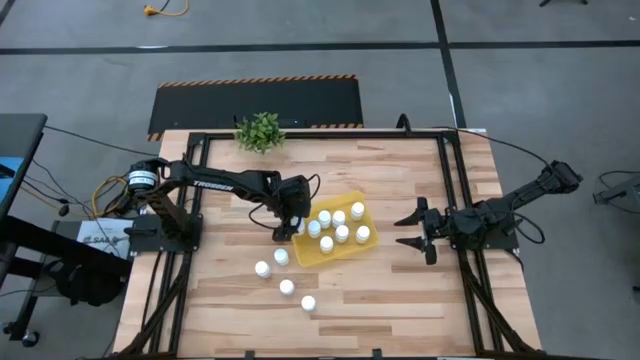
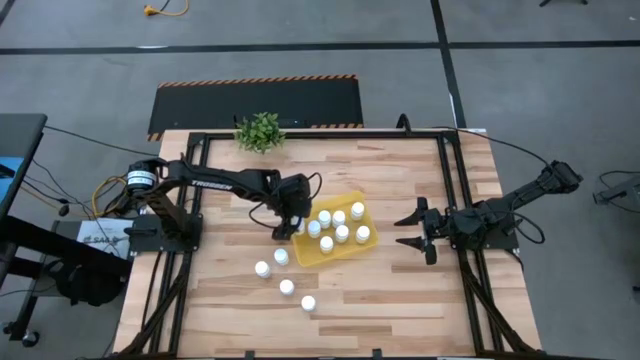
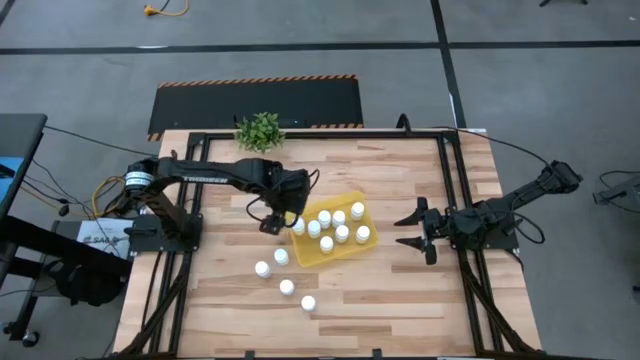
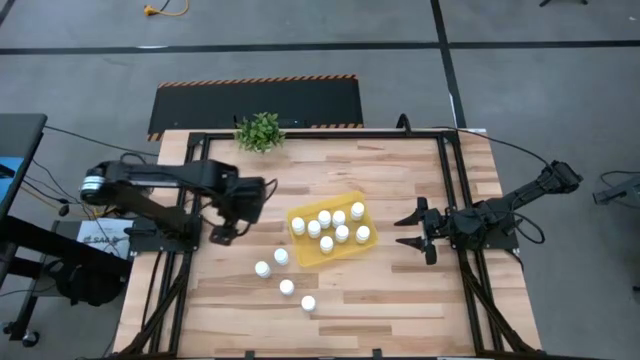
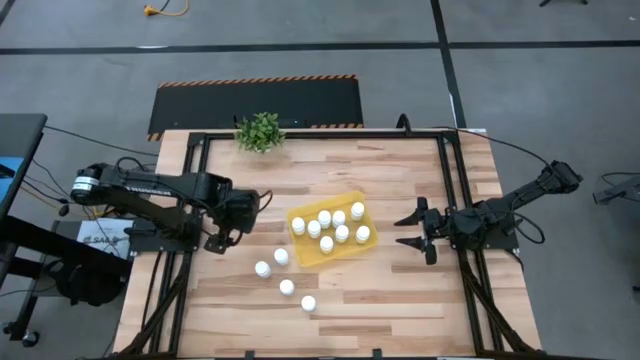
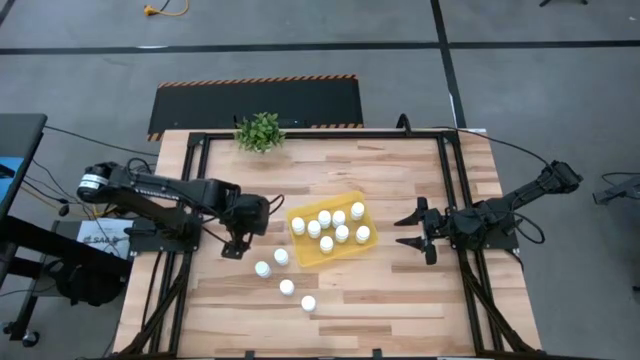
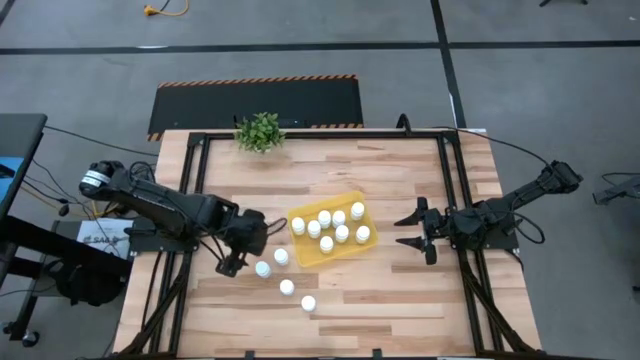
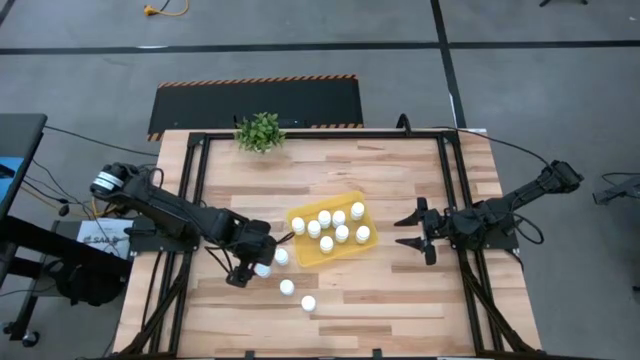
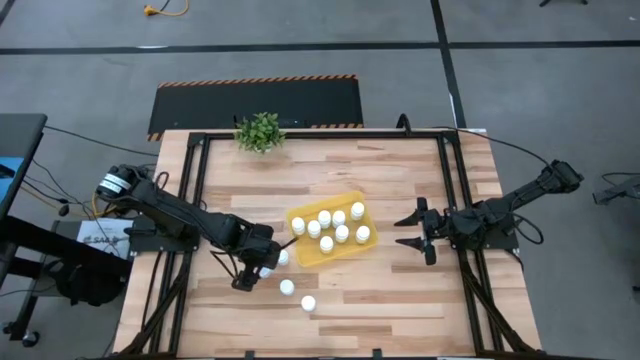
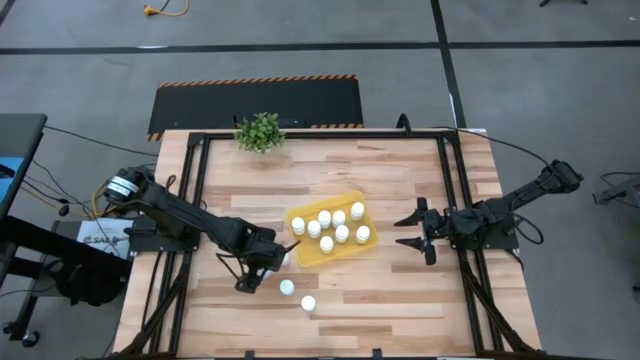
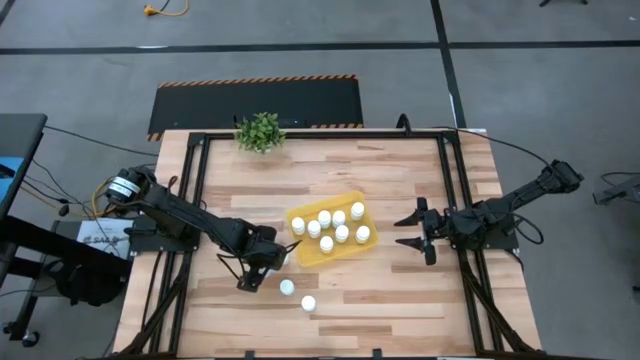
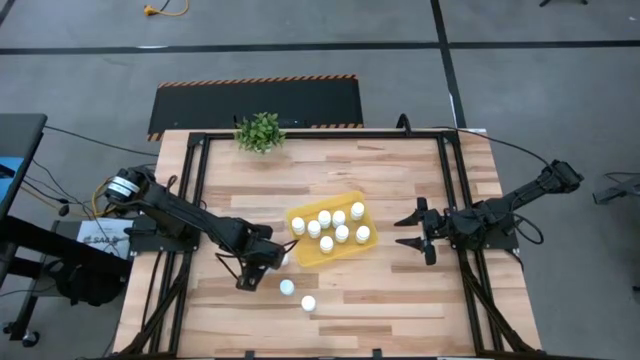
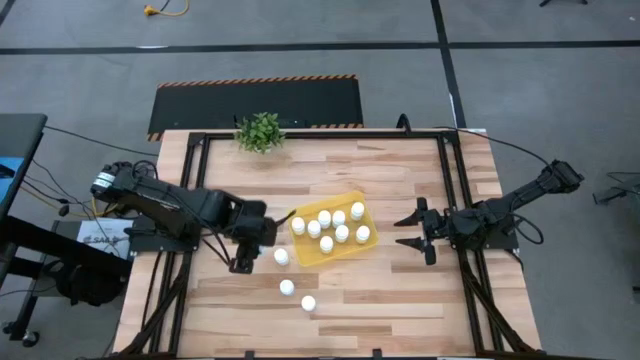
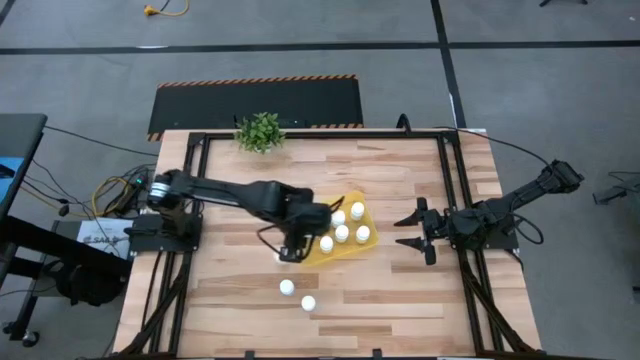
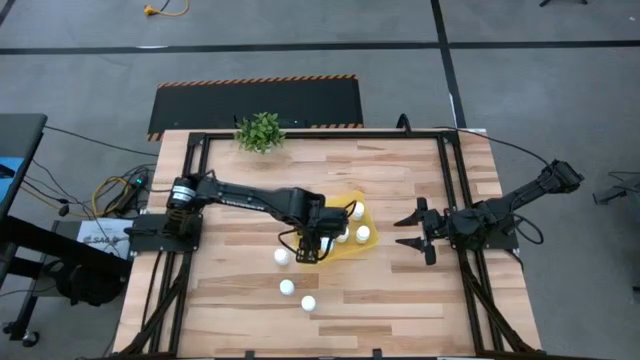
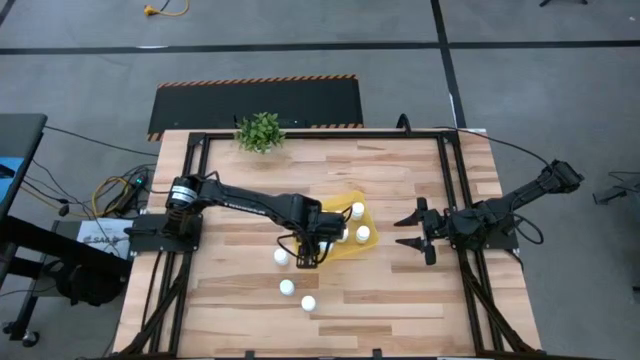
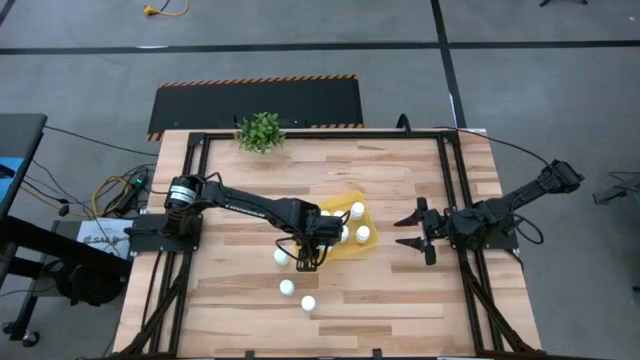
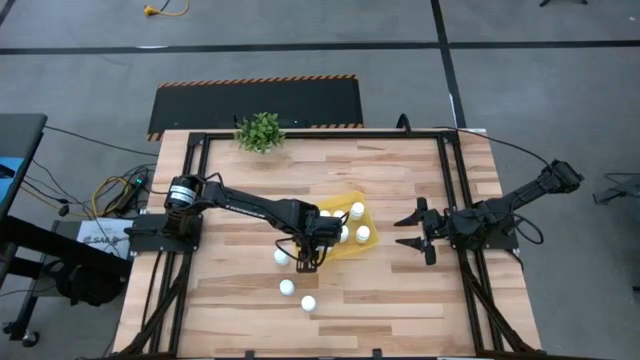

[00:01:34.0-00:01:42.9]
Task: Pick and place pill bottles into a basket
Put the white pill bottle into the yellow bin

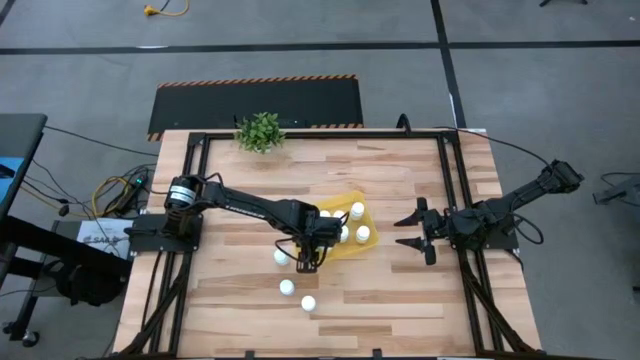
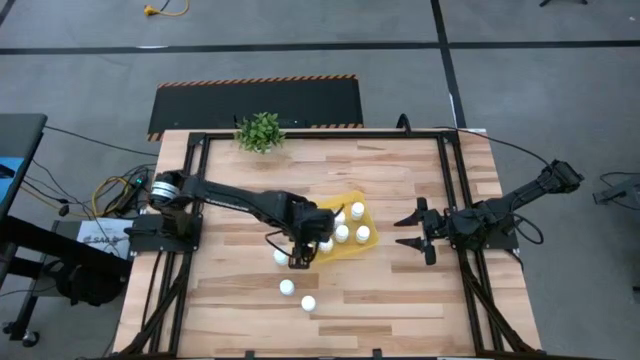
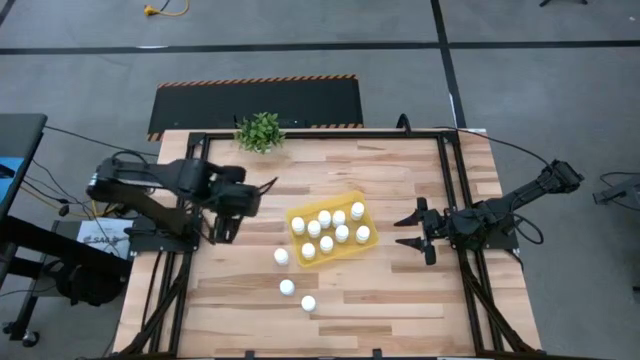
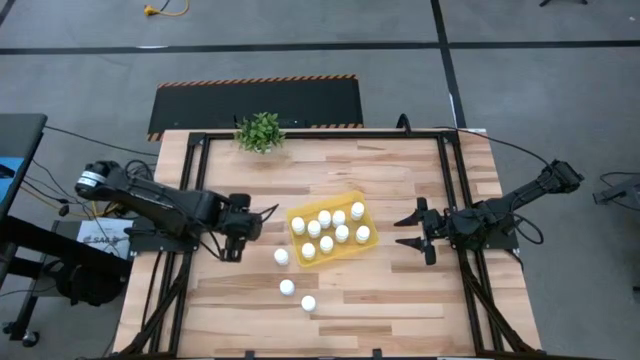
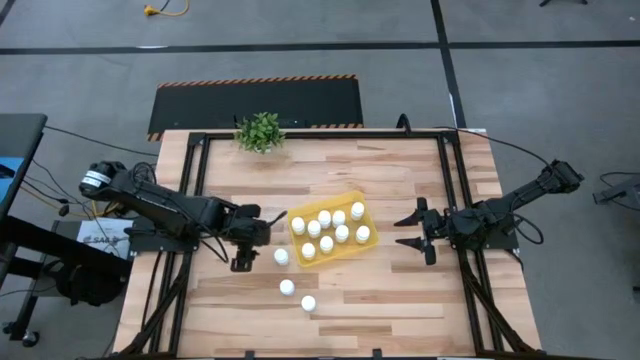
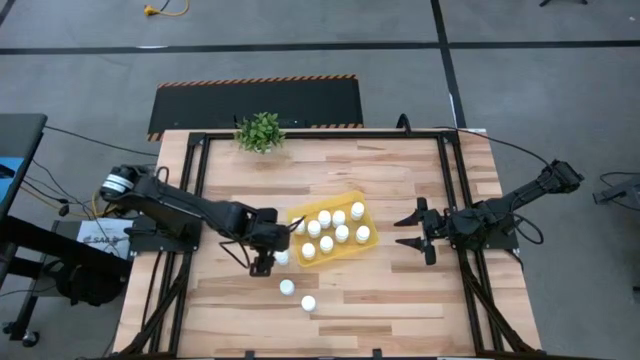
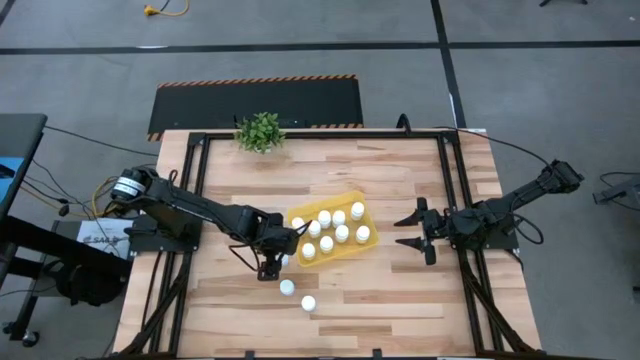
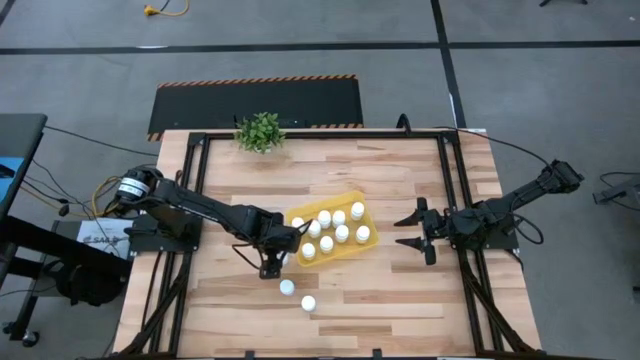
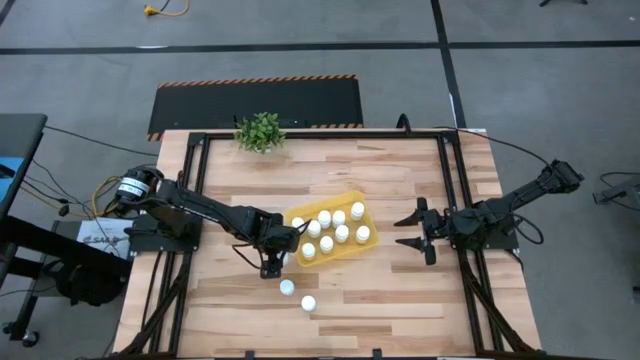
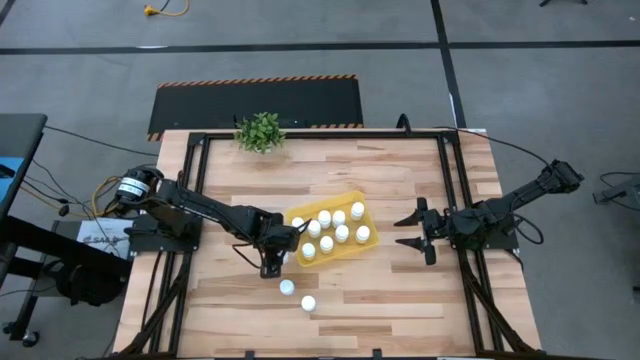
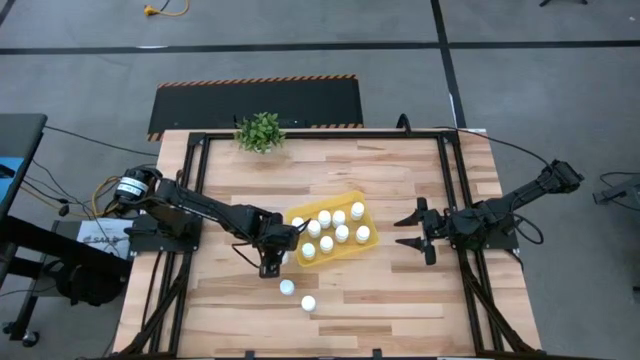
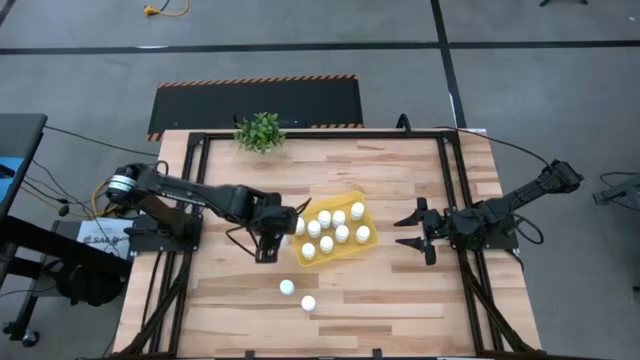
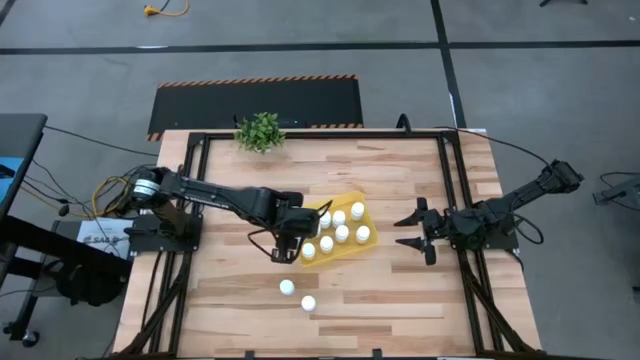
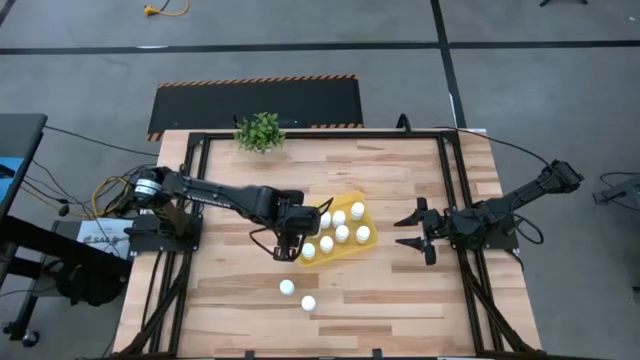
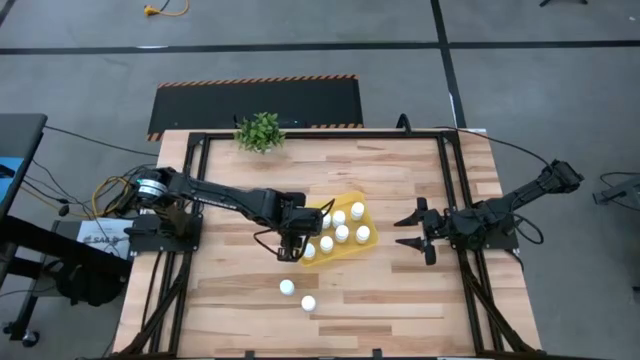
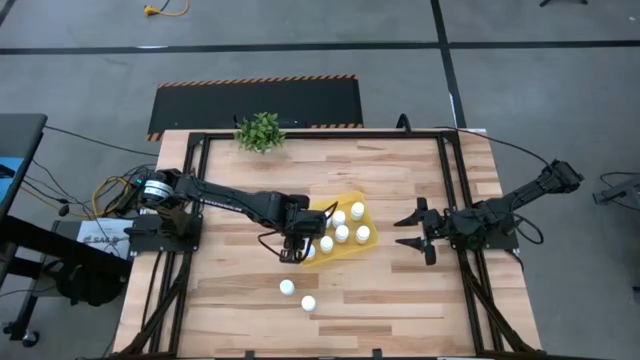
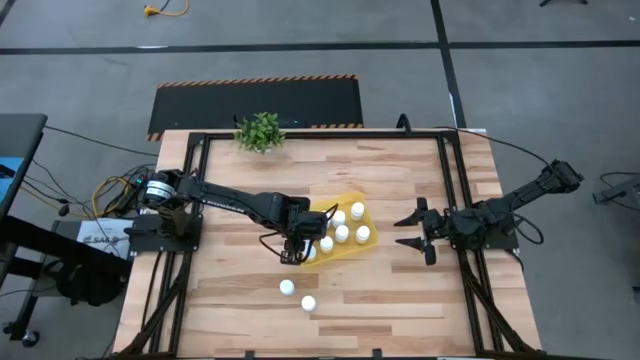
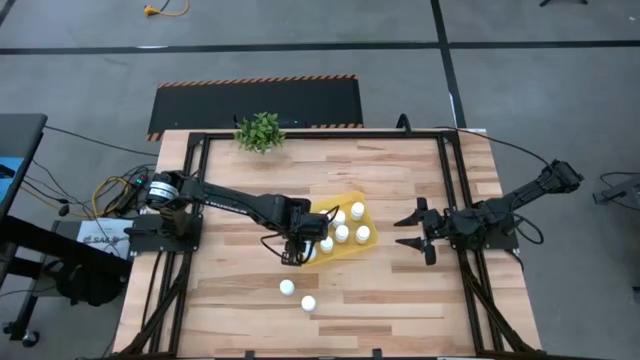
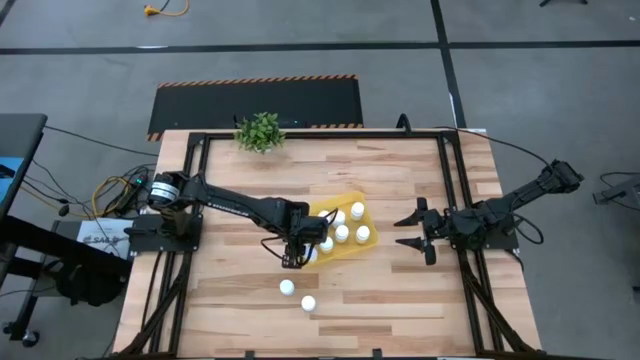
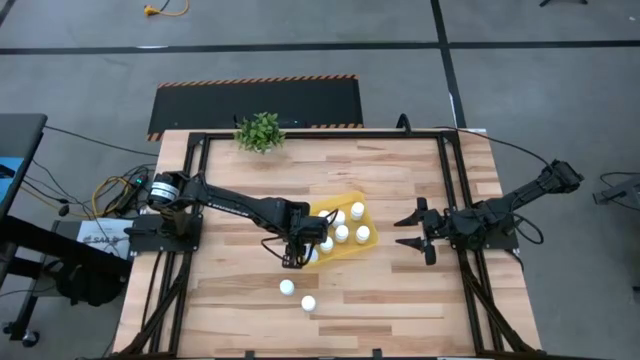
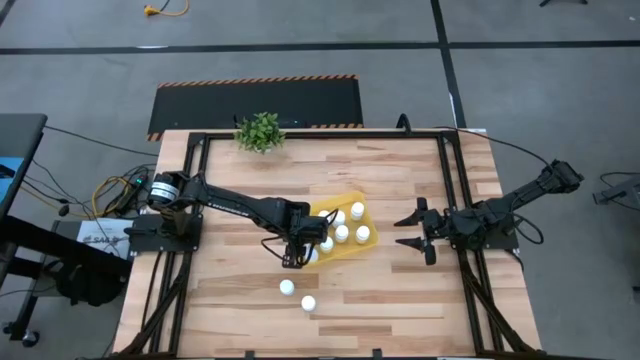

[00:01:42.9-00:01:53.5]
Put the white pill bottle into the yellow bin

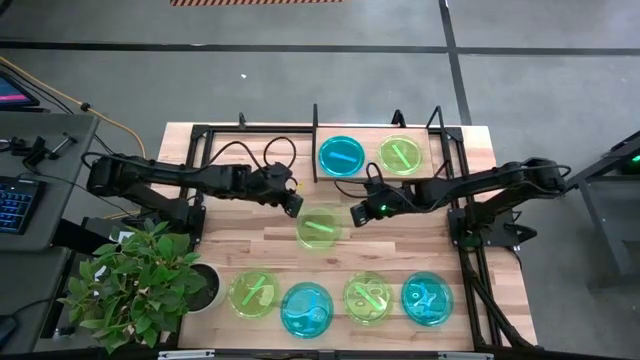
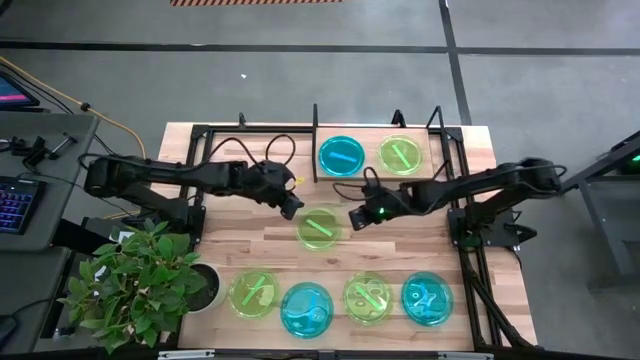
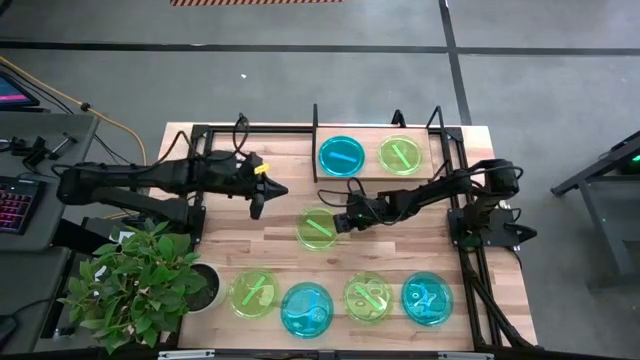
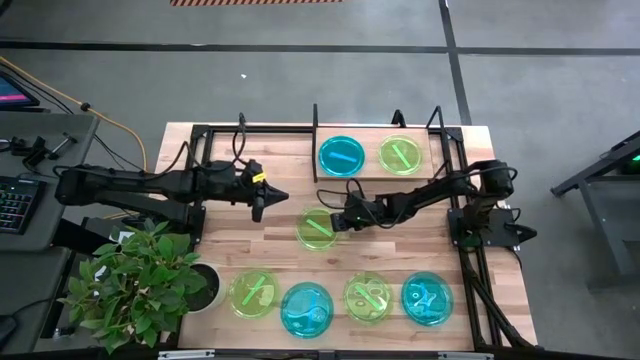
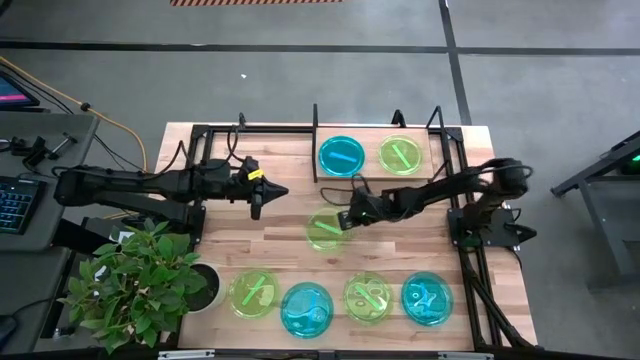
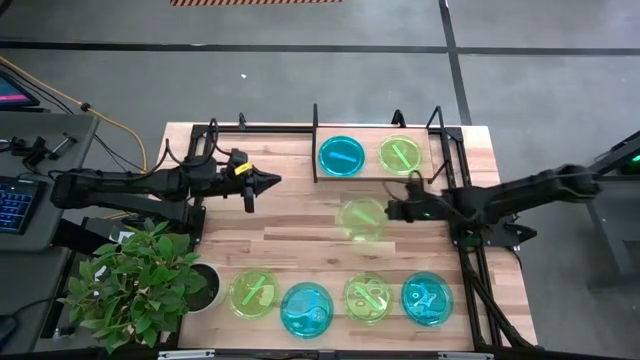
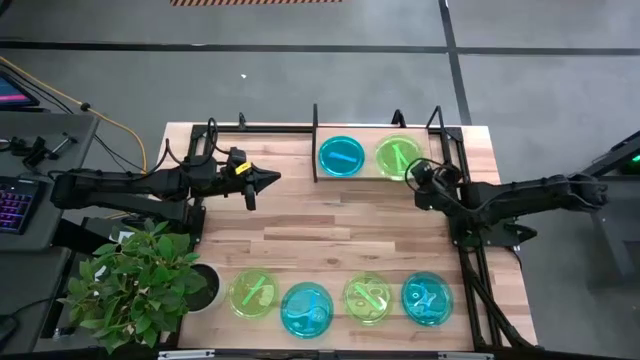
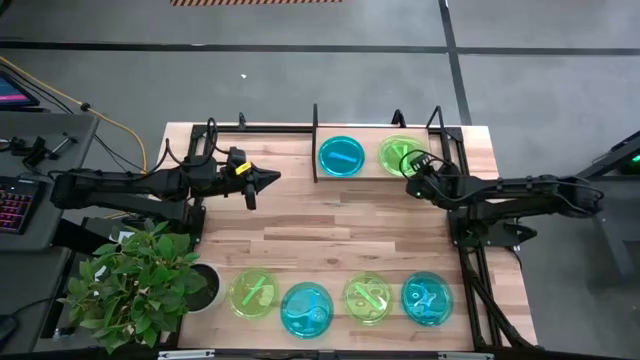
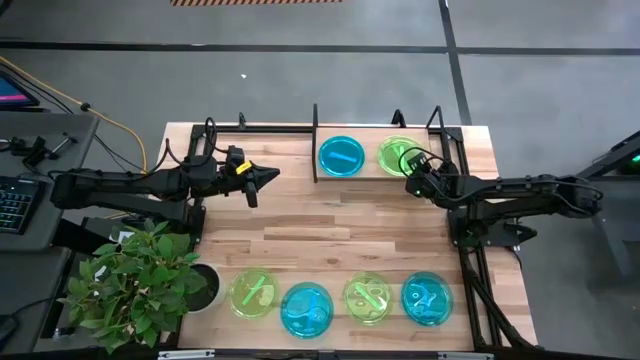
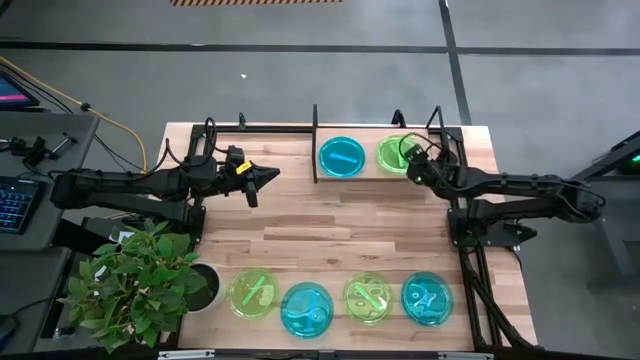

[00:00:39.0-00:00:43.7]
Task: Place and stack plates onto a shelf
Stack the top green plate on top of the green plate on the shelf
